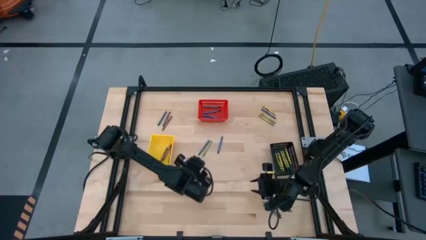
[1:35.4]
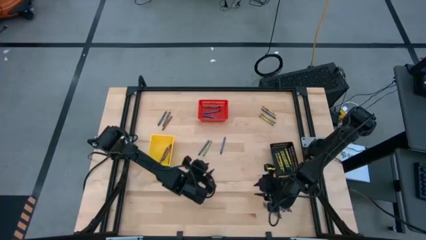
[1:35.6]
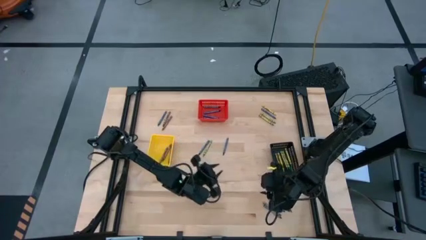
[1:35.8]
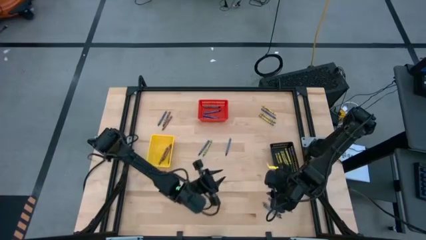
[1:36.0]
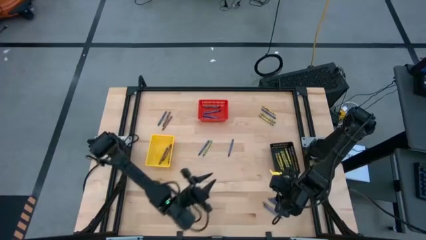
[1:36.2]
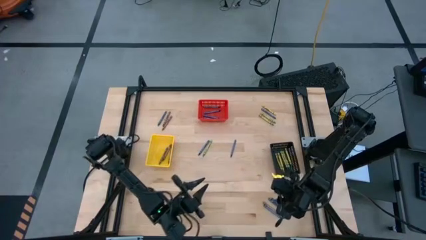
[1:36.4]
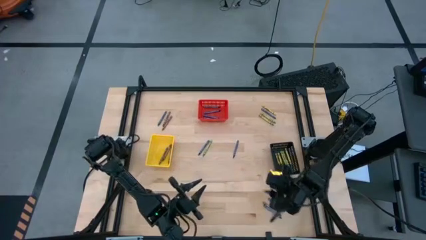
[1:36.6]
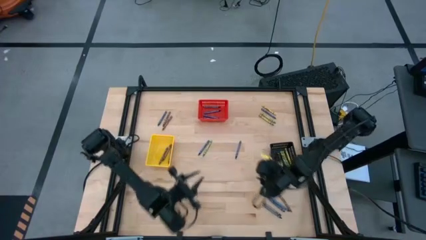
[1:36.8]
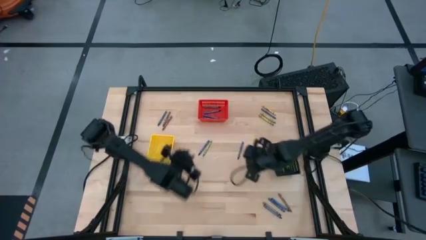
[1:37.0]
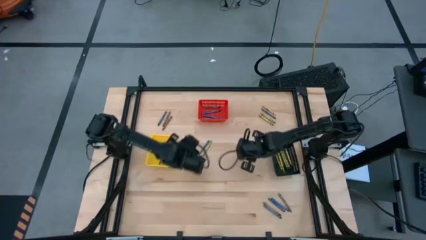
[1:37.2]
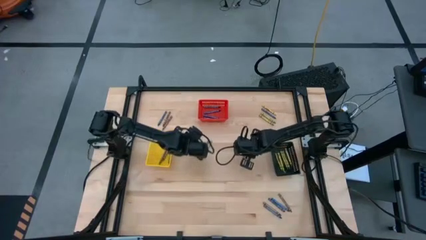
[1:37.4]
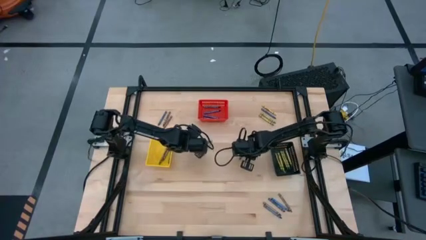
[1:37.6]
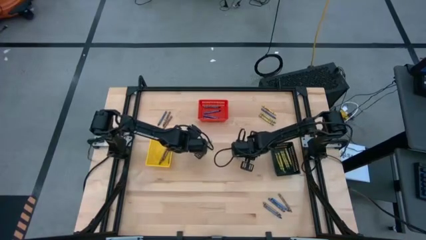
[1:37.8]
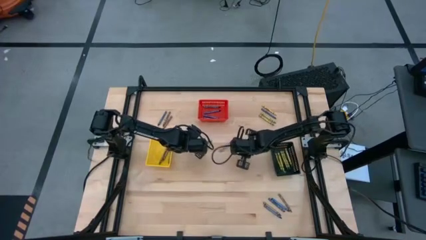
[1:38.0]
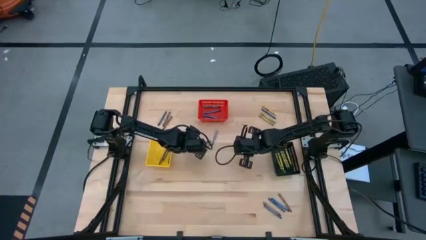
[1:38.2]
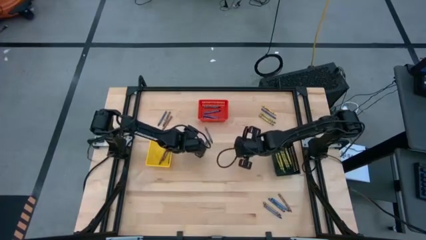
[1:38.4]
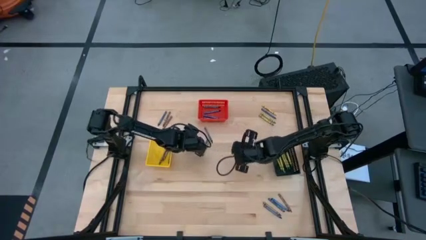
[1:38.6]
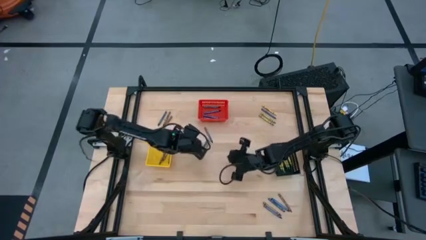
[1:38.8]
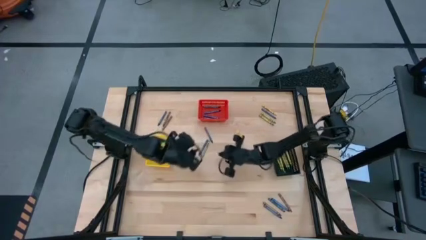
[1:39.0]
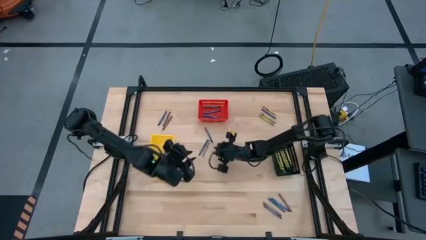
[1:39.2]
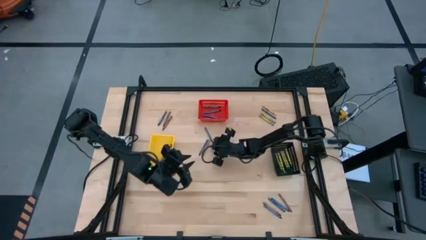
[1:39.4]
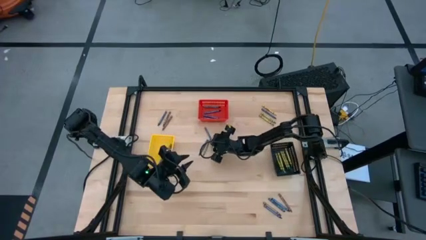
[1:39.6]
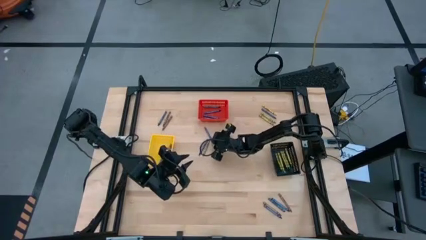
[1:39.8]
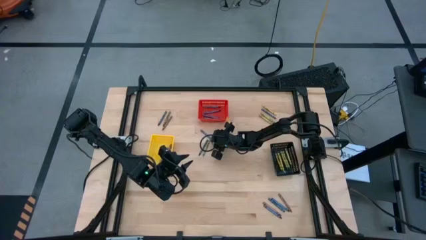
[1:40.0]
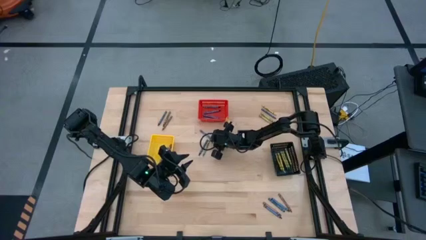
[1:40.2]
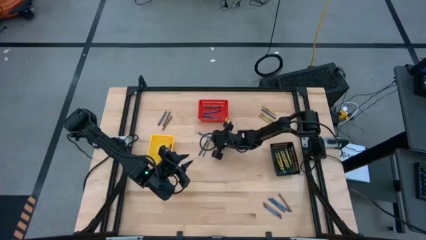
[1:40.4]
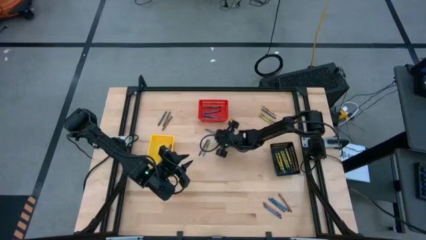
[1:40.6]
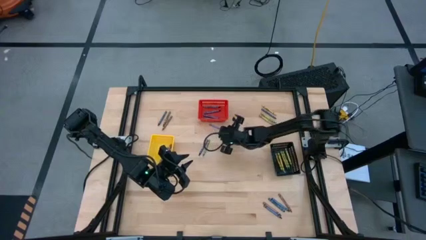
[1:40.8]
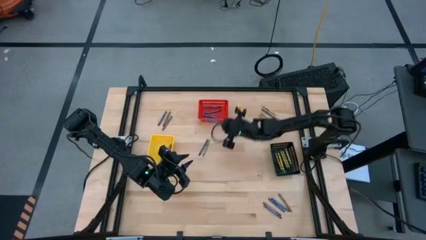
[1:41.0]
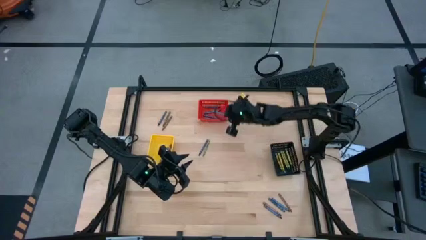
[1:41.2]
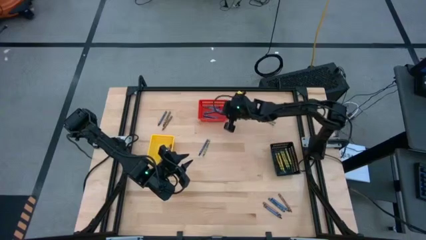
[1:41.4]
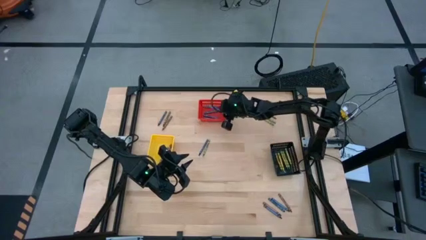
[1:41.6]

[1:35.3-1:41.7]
Task: Sort crayons
Put the blue crayon into the red basket

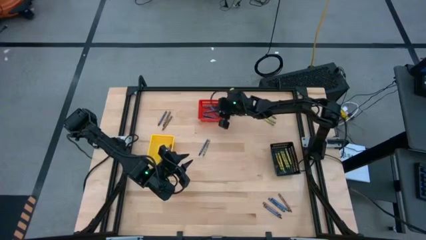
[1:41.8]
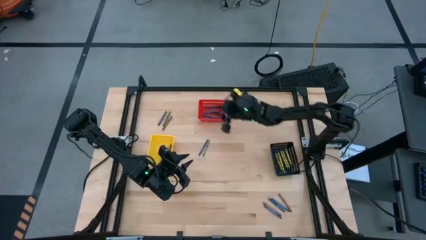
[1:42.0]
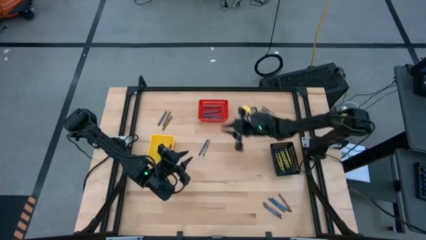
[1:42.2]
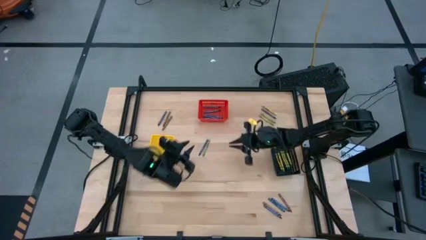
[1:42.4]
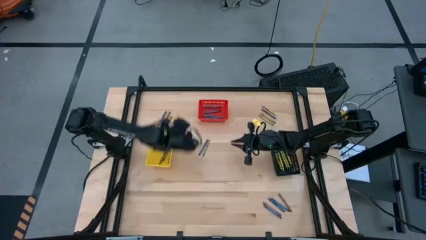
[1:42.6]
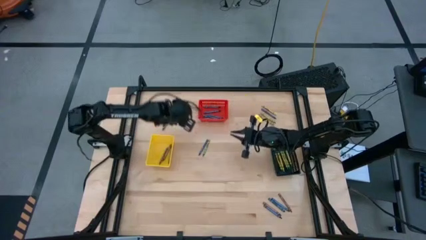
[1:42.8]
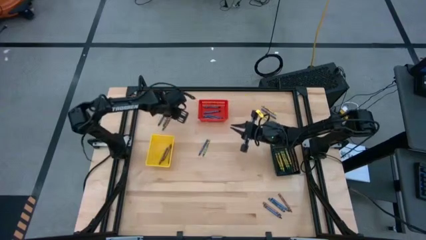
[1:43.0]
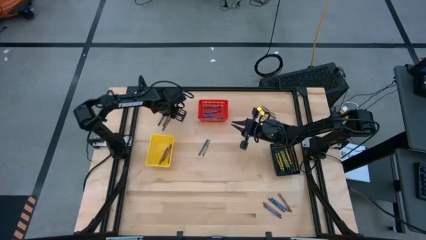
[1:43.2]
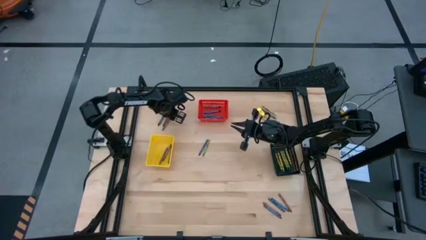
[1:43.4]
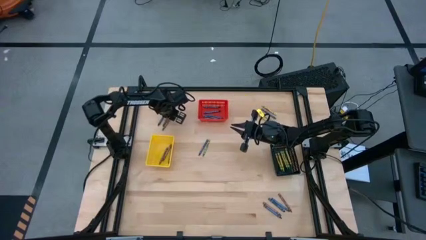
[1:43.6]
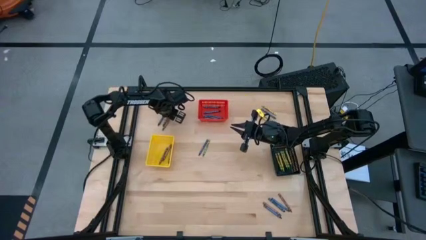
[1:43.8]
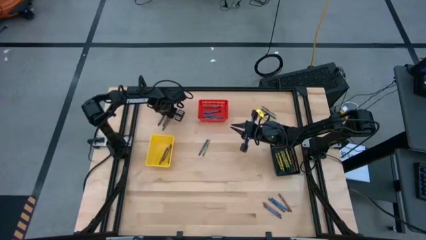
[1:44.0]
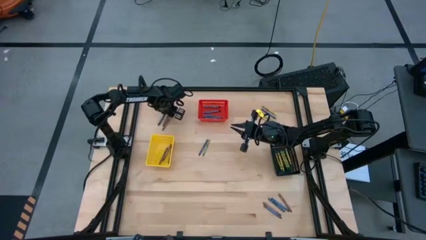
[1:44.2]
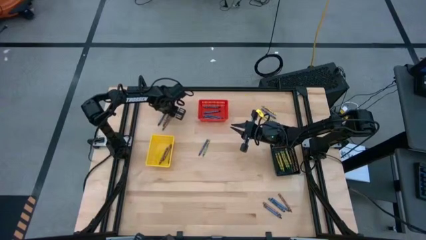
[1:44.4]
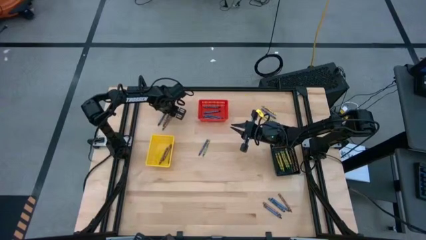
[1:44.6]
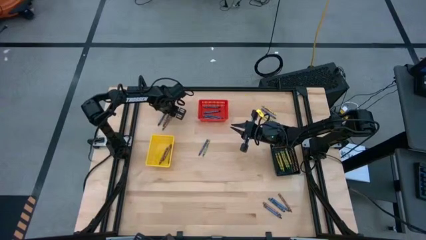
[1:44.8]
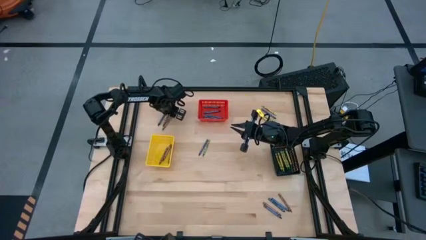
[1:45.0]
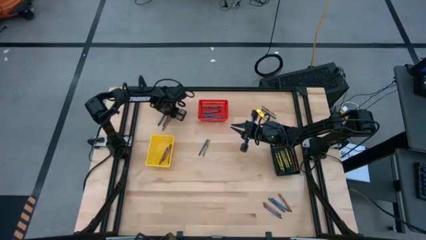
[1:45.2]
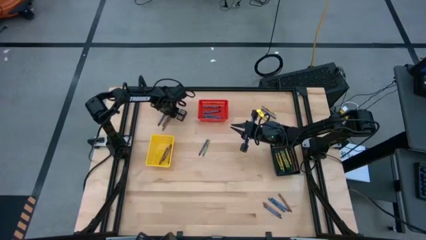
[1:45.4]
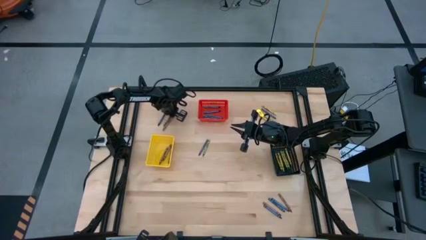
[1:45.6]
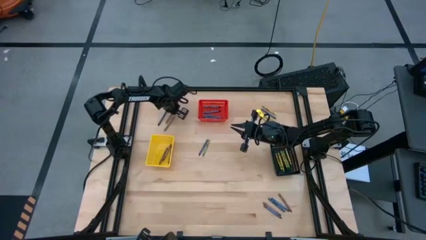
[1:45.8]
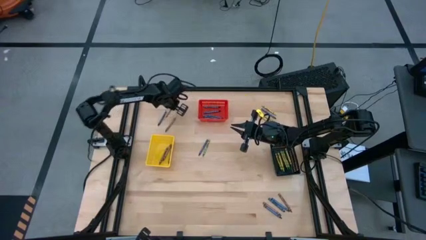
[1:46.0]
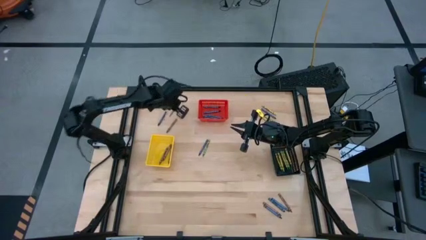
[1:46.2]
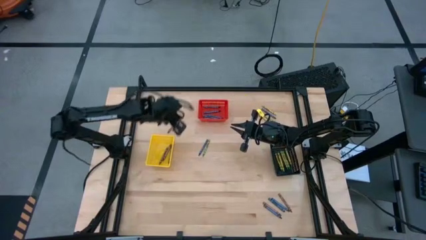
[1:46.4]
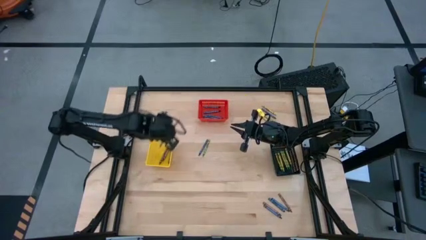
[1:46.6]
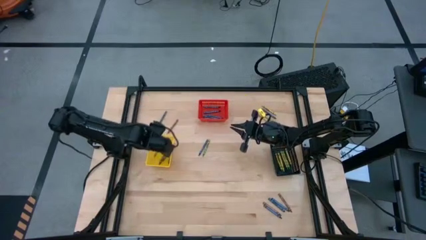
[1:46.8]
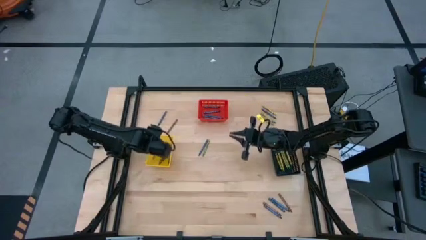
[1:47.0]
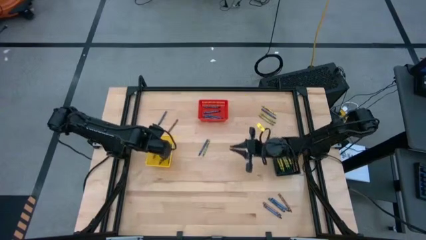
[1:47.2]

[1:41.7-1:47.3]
Put the brown crayon into the yellow basket

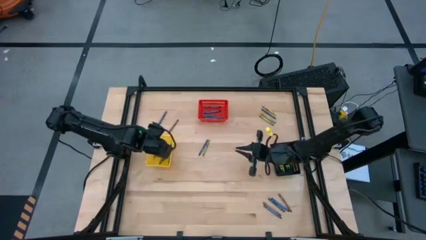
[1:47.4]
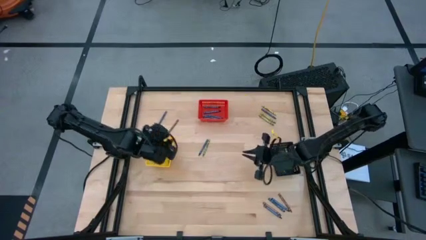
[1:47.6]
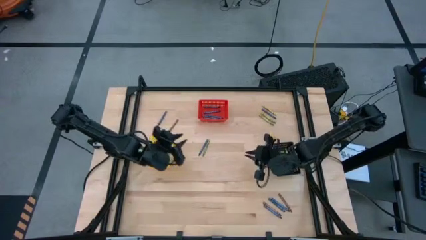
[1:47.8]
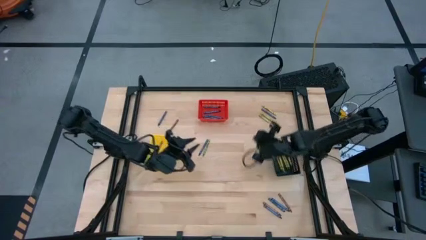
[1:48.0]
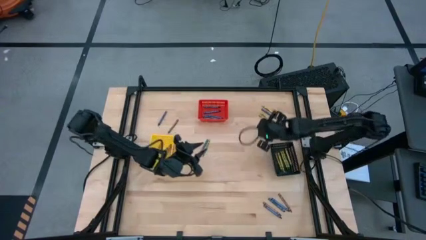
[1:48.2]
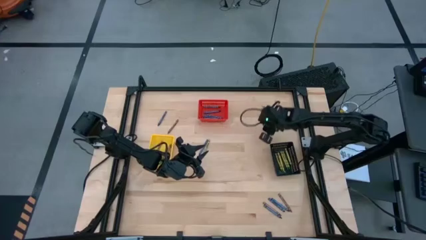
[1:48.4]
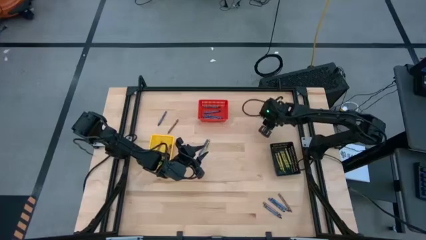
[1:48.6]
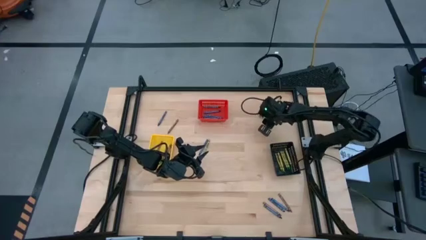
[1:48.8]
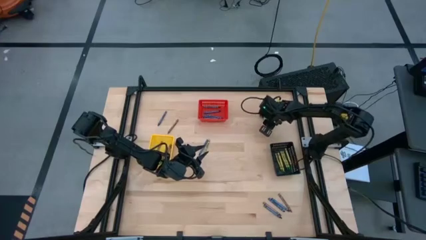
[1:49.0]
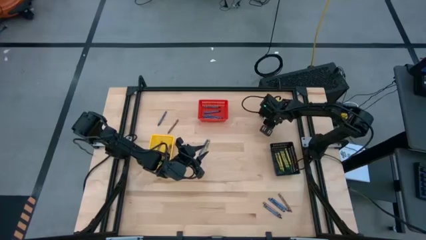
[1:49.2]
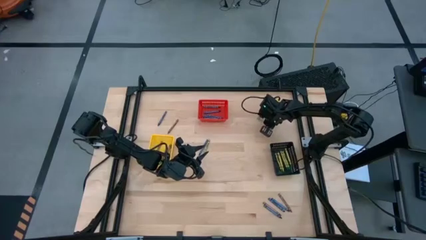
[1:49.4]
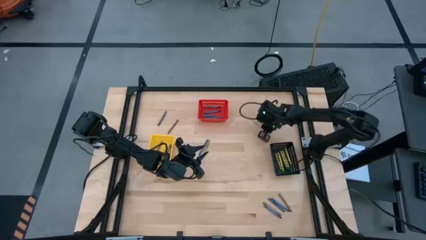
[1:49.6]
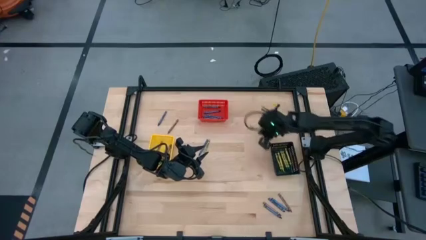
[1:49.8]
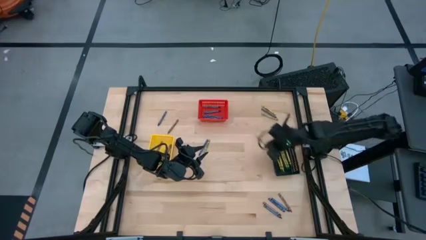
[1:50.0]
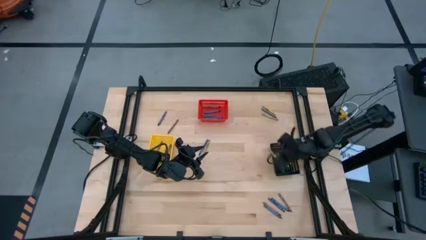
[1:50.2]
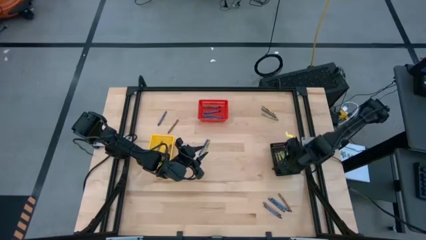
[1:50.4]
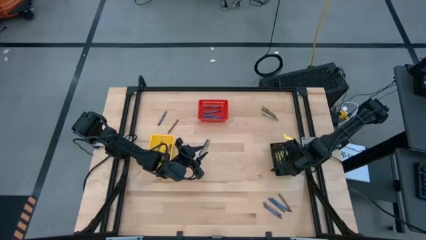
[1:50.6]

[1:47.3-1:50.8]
Put the green crayon into the black basket

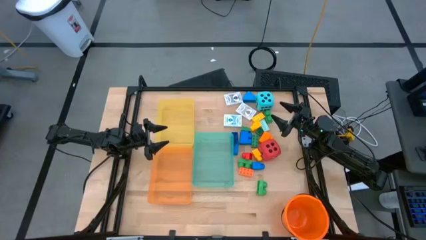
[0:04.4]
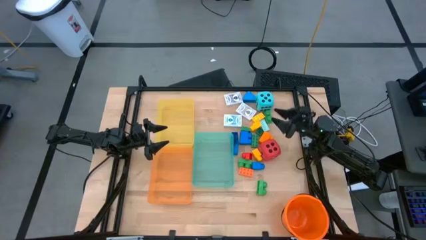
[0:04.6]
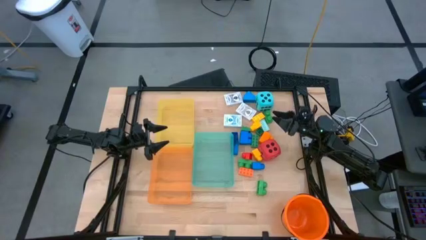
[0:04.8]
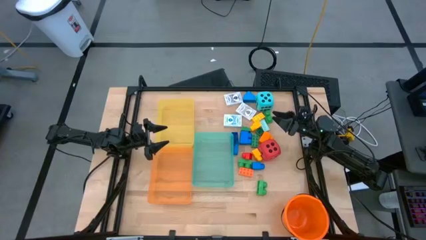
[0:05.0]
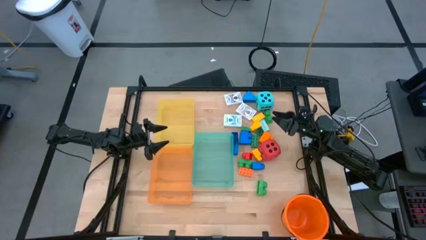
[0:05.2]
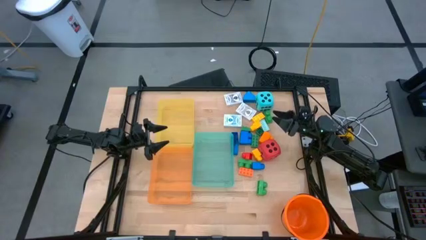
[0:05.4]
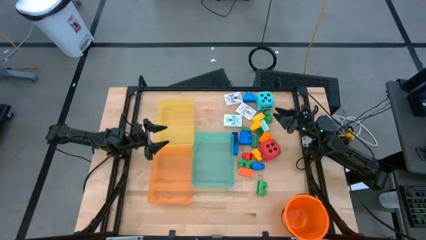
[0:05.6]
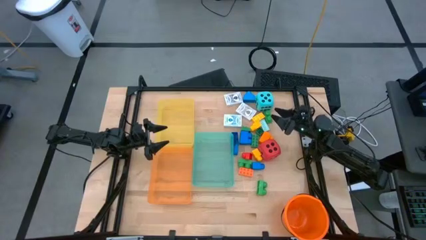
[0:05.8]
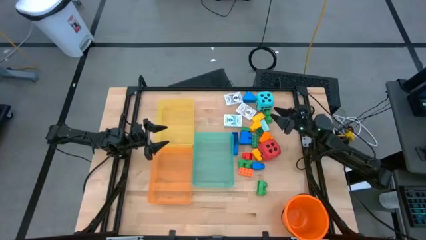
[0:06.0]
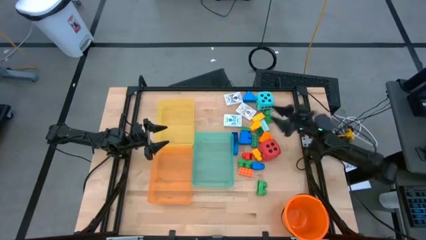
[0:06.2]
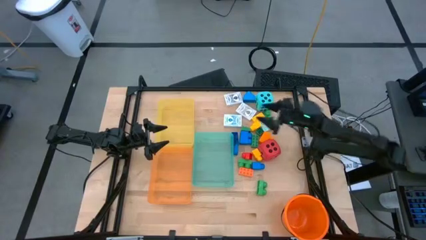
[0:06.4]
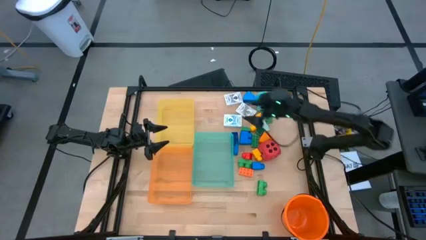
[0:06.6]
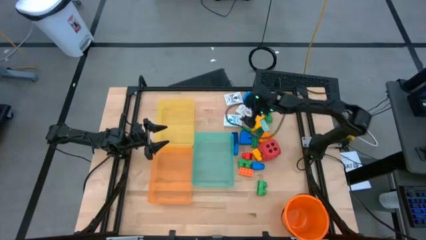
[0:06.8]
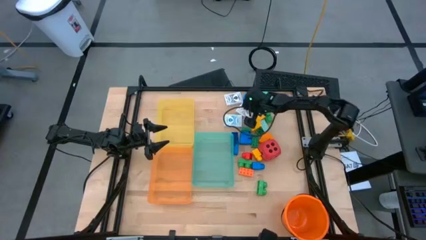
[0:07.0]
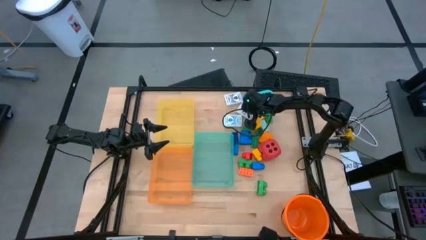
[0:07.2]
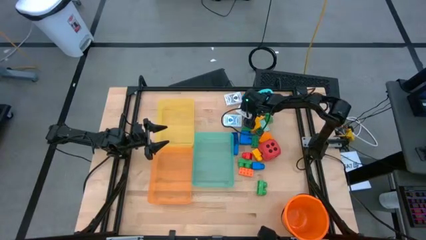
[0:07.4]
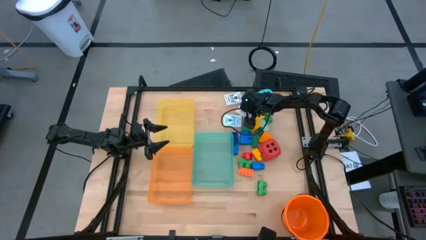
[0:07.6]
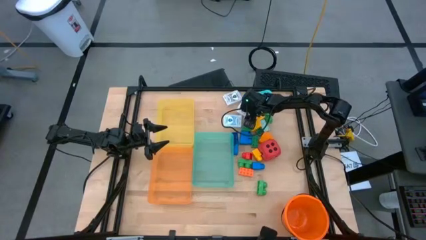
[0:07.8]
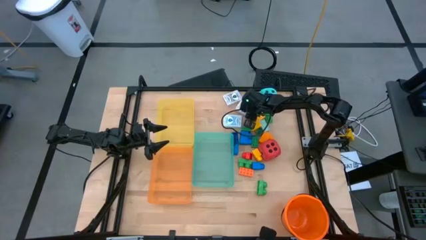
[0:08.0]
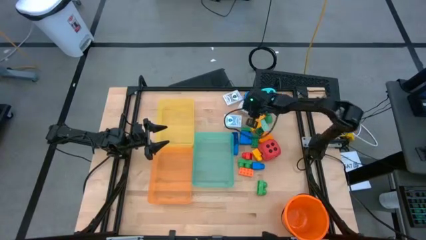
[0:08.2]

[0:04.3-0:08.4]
Task: Pick & Place Toys
Put the brown deck of cards into the yellow bin
